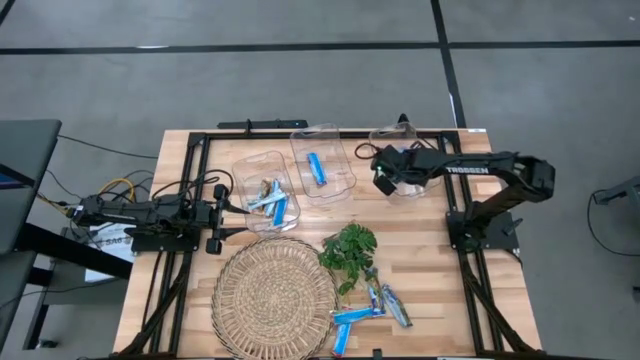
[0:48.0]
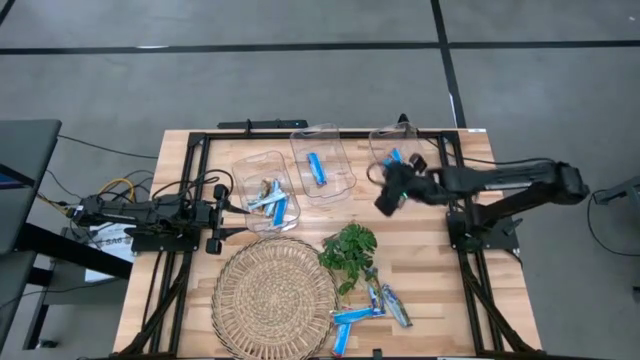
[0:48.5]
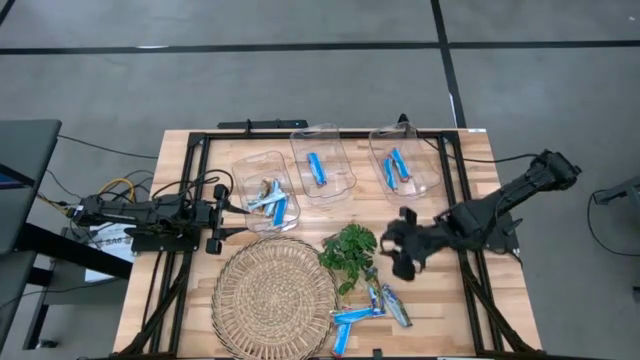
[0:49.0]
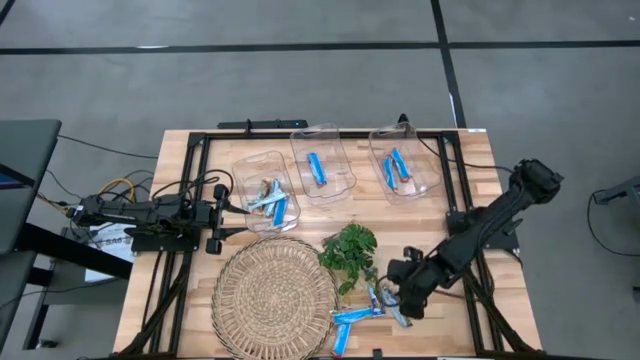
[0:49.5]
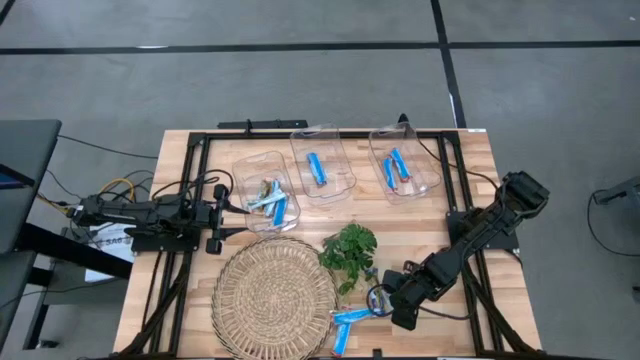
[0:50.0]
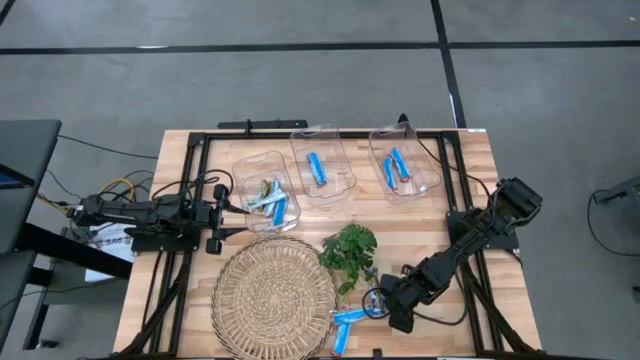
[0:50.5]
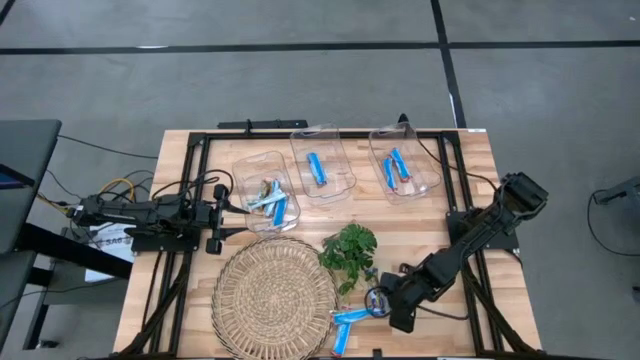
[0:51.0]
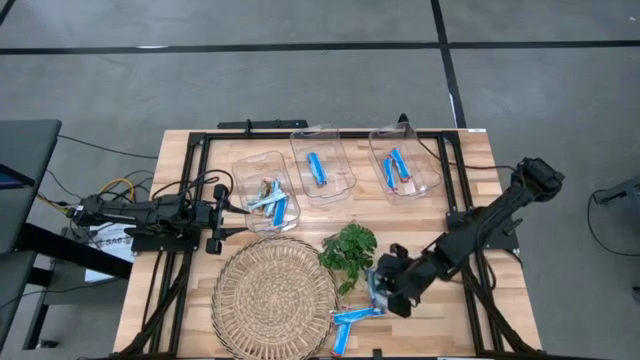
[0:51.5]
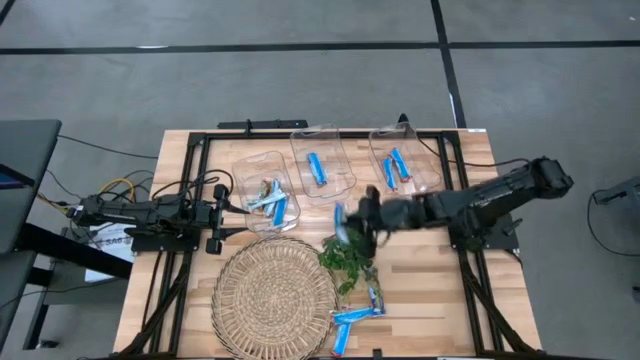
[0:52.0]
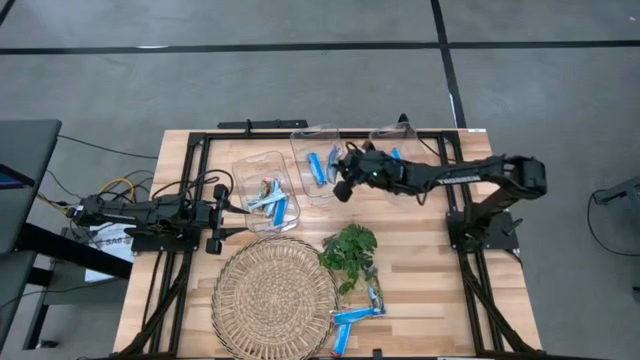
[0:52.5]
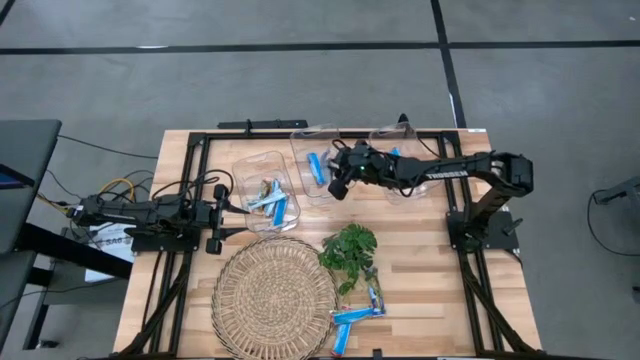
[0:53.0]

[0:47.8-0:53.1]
Task: Pick and place Granola Bars by type
Put the right blue granola bar into the middle transparent bin

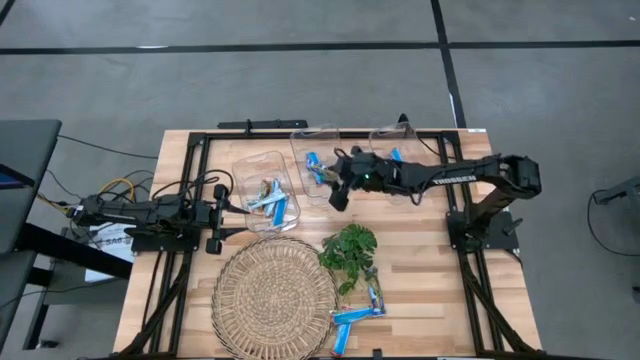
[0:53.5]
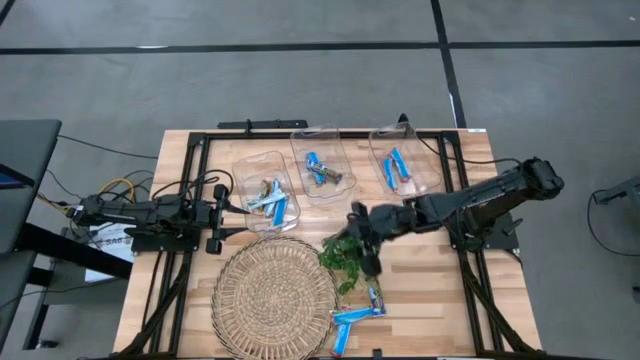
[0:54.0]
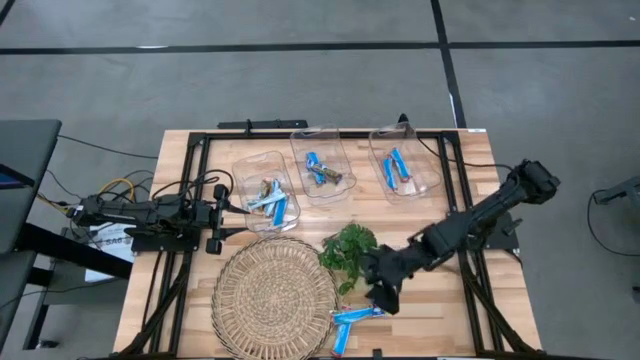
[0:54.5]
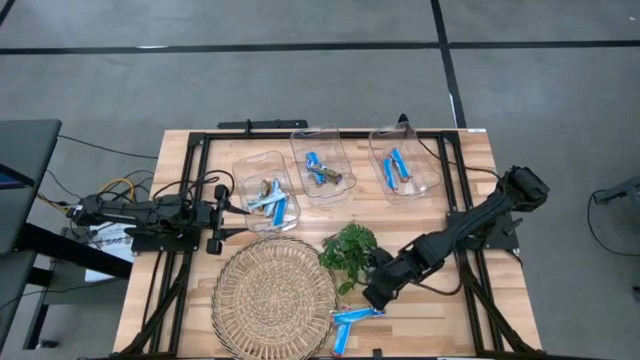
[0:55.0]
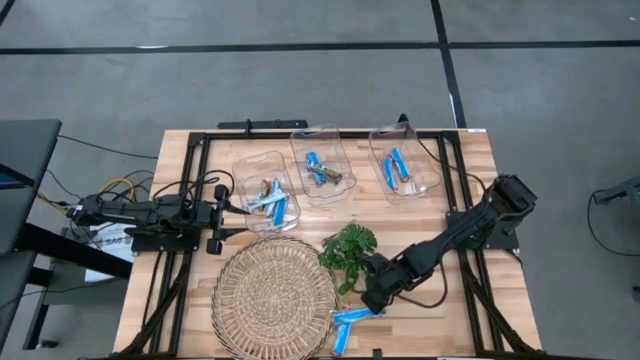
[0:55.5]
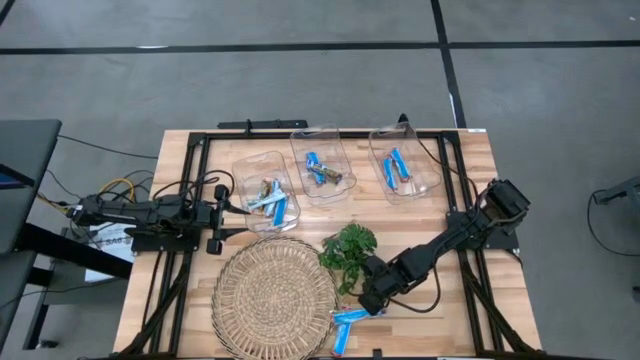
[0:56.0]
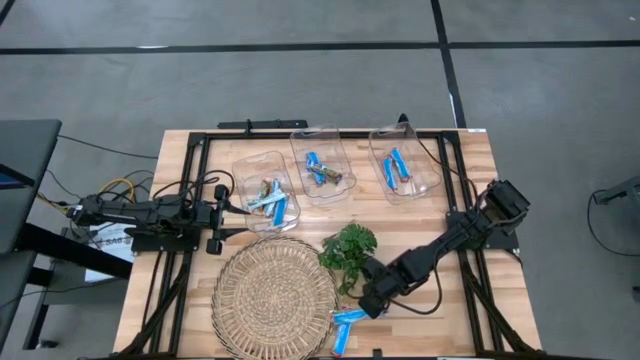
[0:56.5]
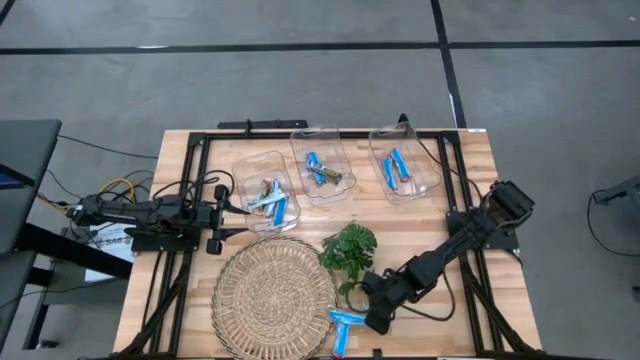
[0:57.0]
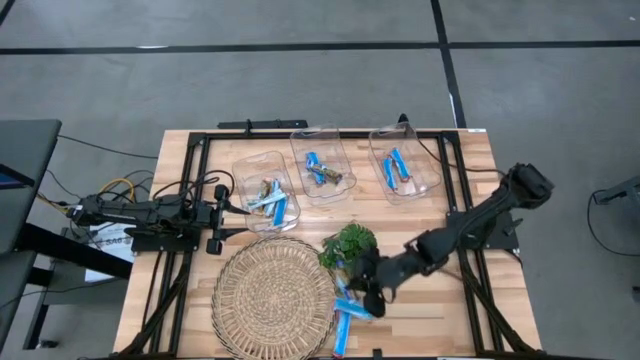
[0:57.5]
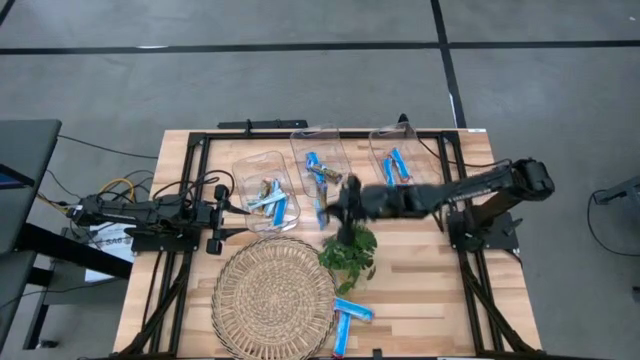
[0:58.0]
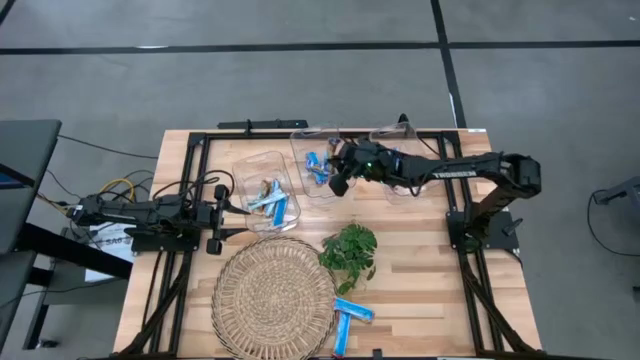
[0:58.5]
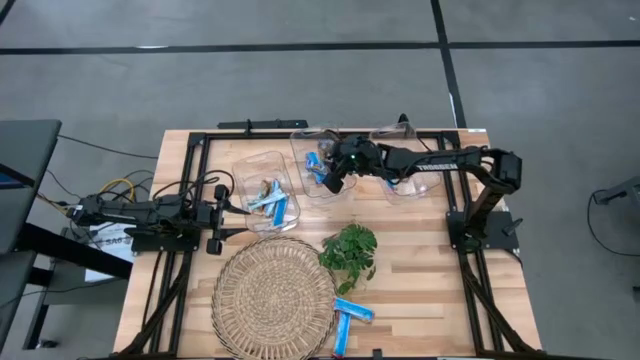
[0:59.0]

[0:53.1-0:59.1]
Put the blue granola bar into the middle transparent bin

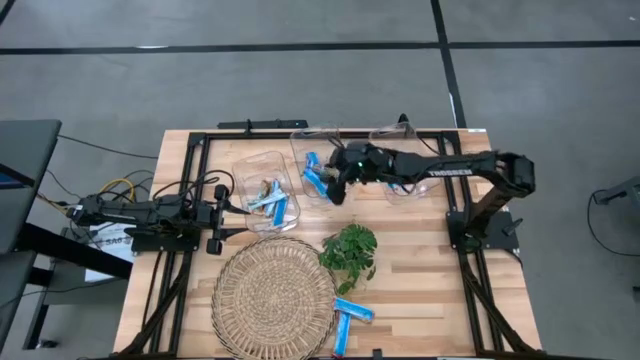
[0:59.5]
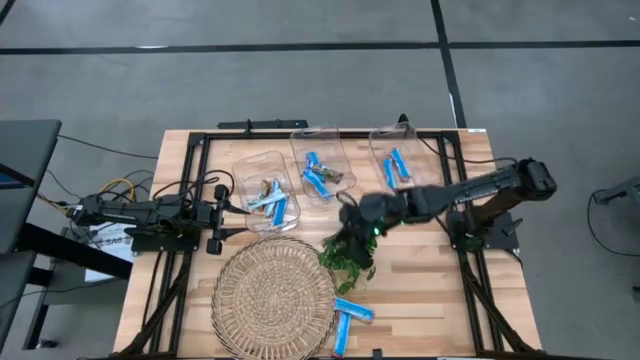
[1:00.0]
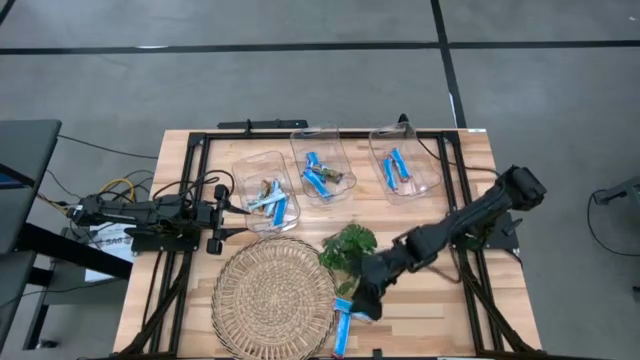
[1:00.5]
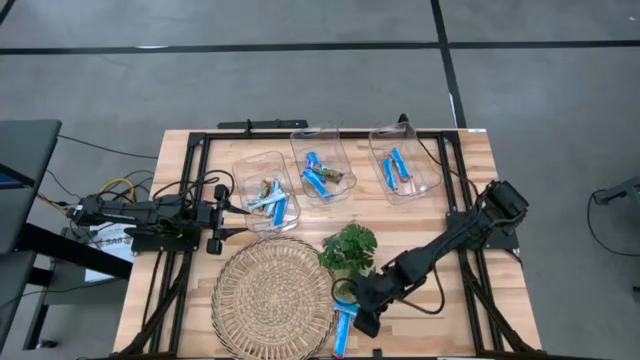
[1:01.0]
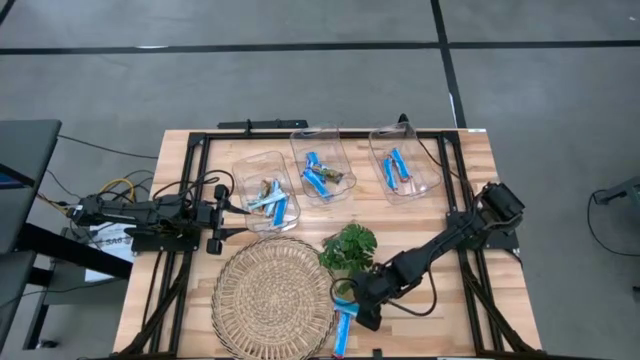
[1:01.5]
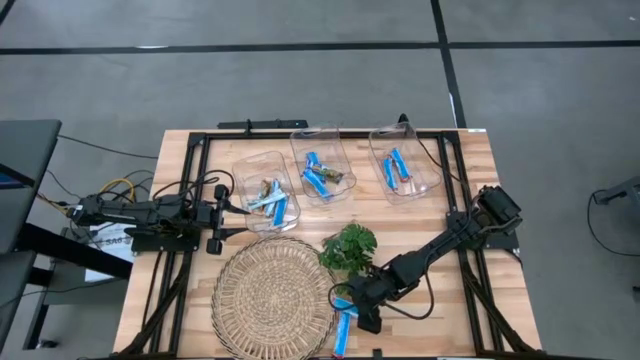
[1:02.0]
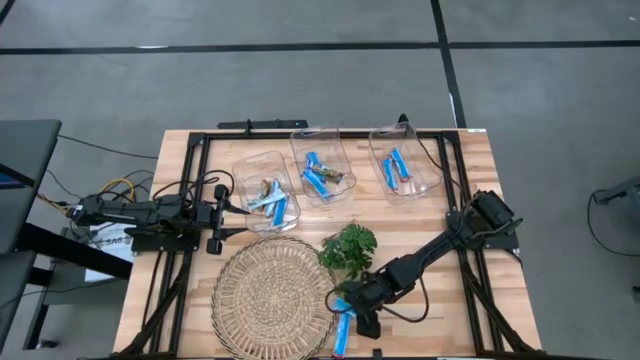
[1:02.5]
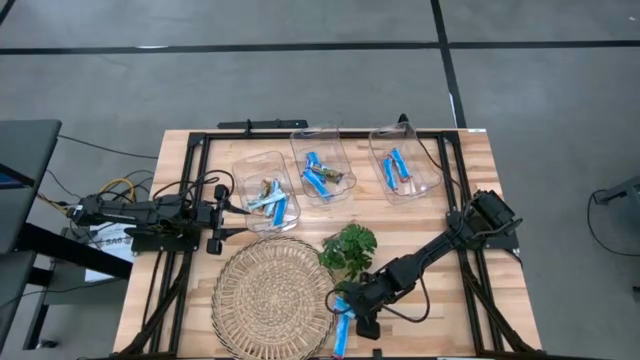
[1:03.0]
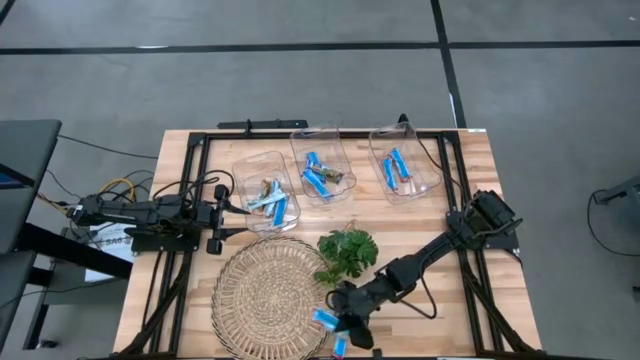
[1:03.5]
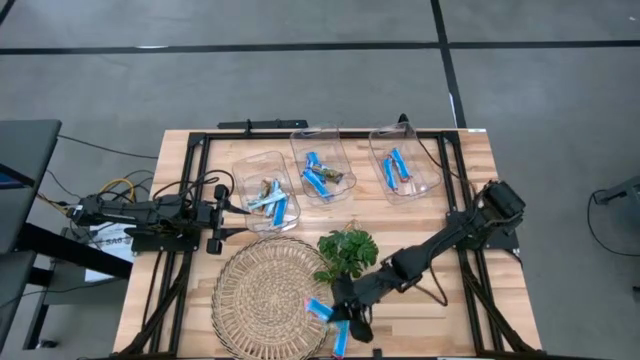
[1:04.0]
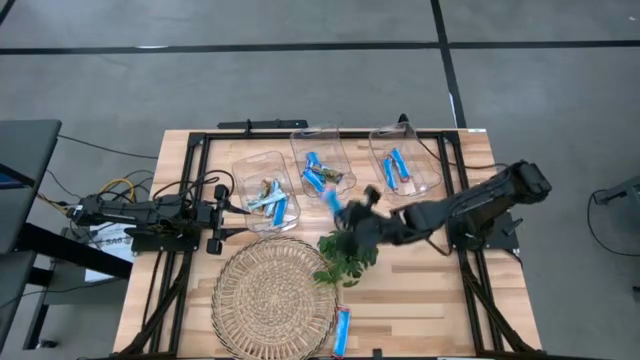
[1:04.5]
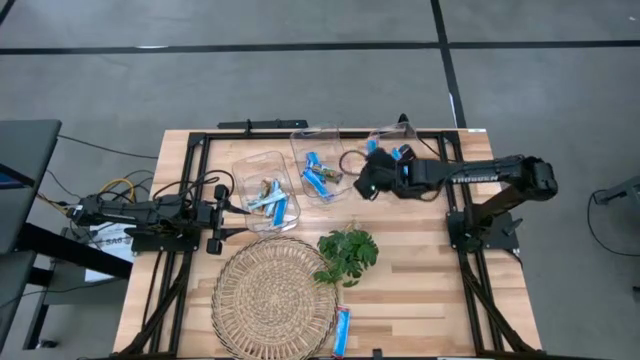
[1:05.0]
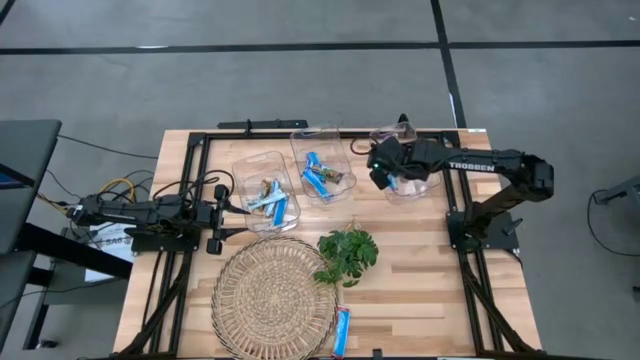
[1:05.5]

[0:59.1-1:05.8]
Put the top red granola bar into the right transparent bin

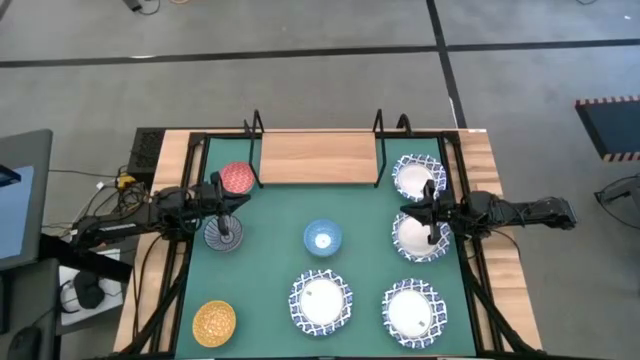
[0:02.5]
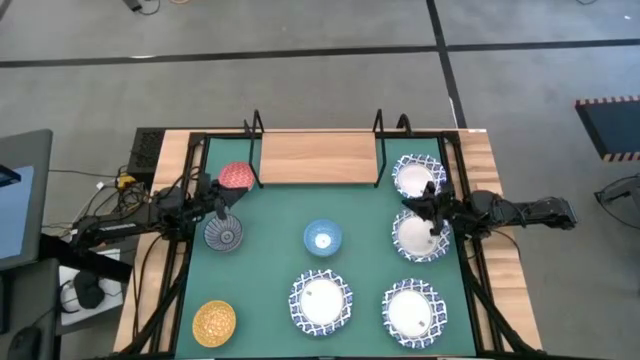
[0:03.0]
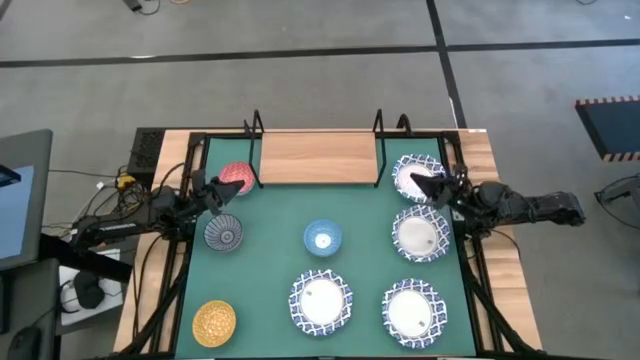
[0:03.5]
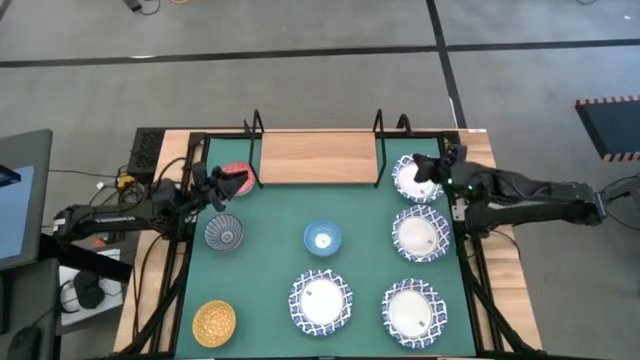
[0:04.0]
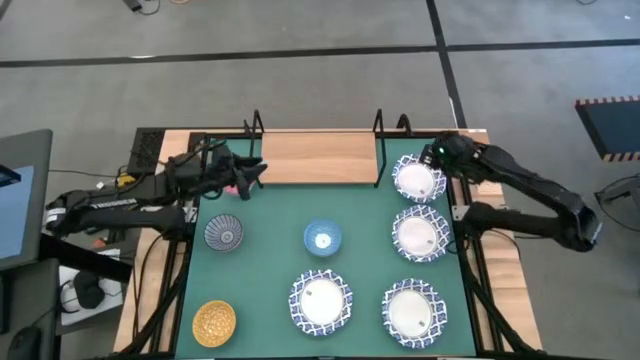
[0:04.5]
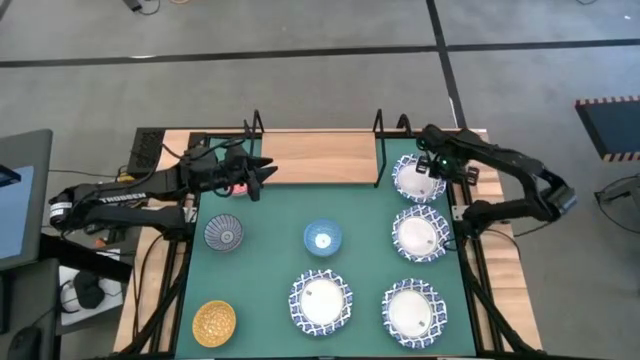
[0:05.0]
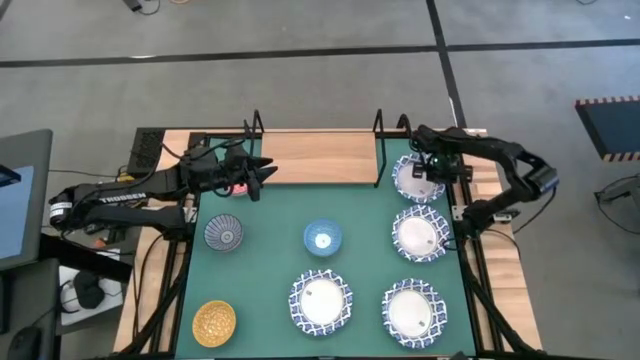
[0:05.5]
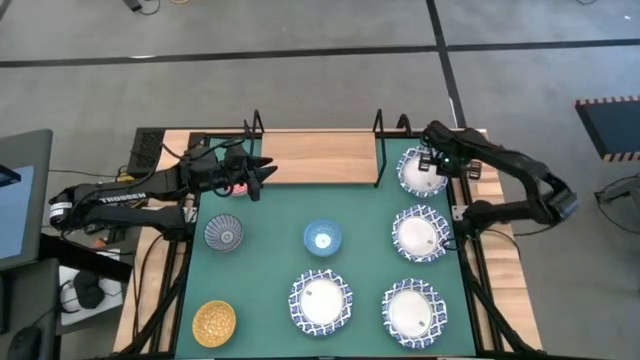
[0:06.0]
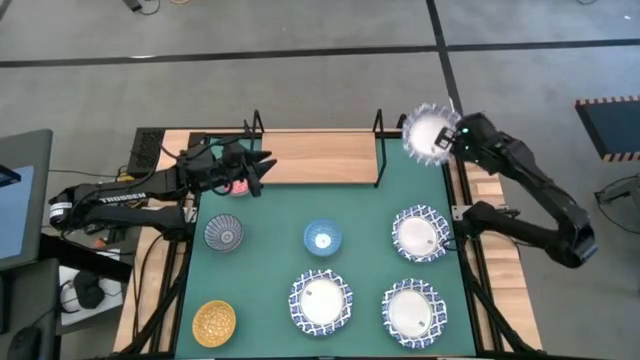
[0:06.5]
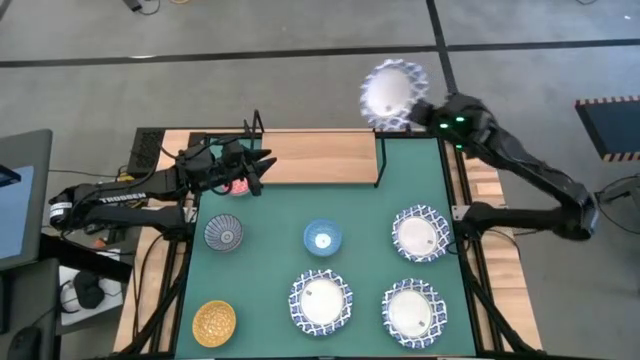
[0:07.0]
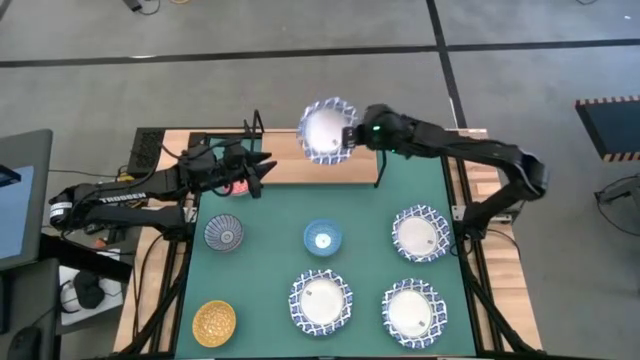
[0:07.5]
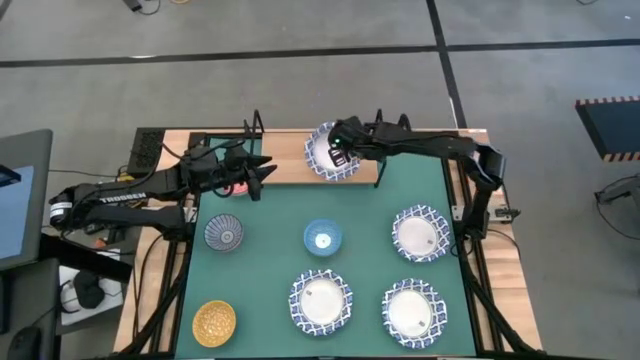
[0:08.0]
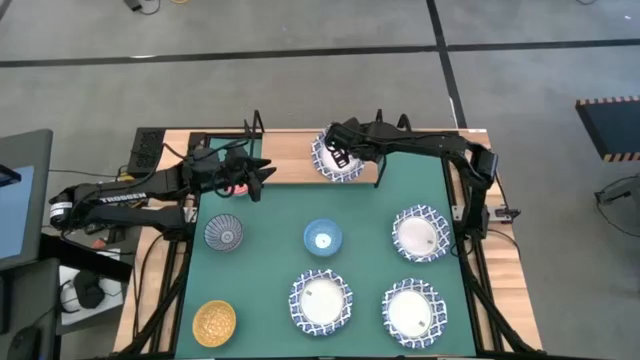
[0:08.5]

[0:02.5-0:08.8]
Task: Place and stack bowls onto a shelf
Put the top white patterned bowl on the shelf
